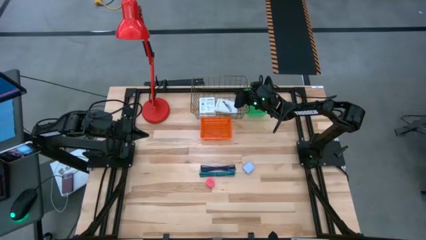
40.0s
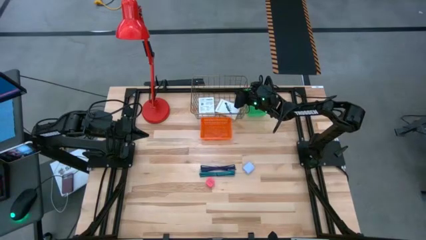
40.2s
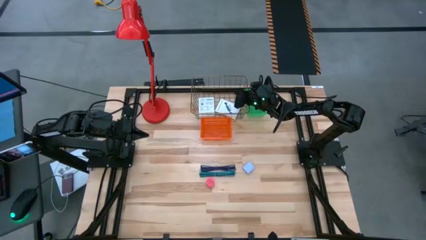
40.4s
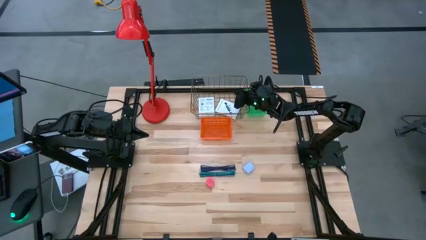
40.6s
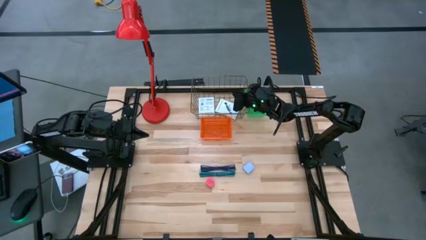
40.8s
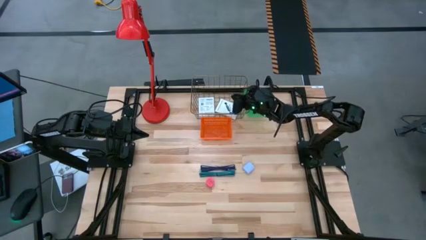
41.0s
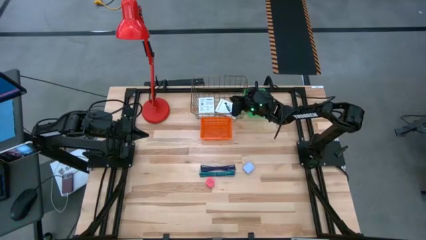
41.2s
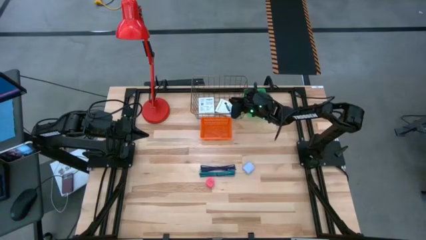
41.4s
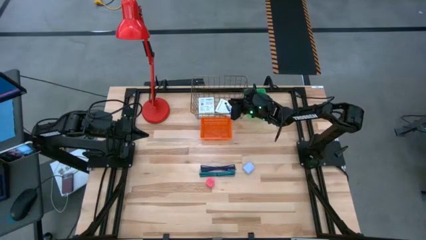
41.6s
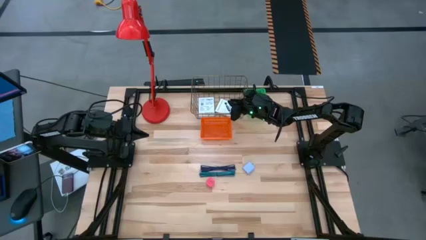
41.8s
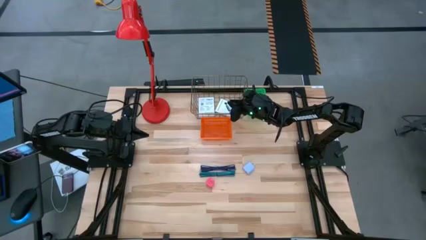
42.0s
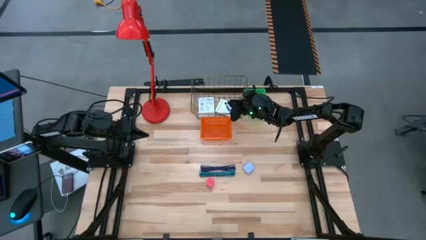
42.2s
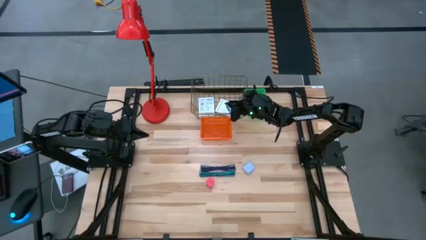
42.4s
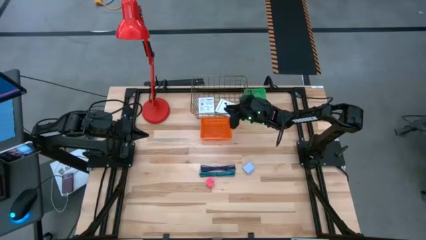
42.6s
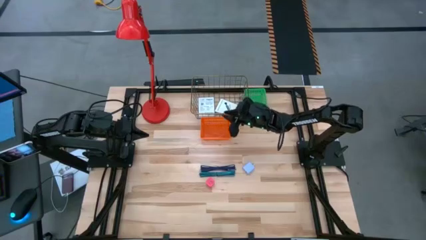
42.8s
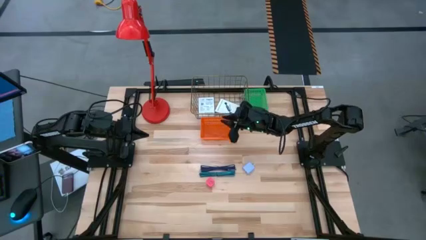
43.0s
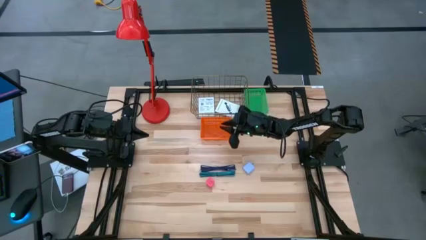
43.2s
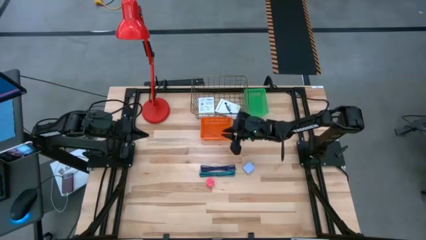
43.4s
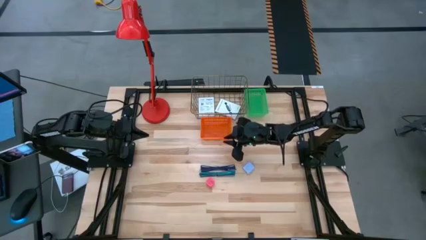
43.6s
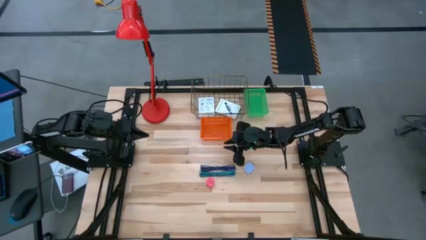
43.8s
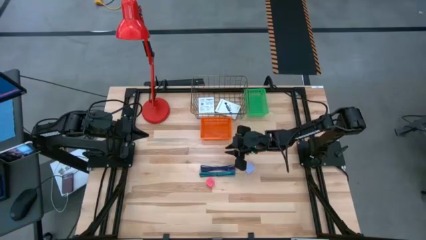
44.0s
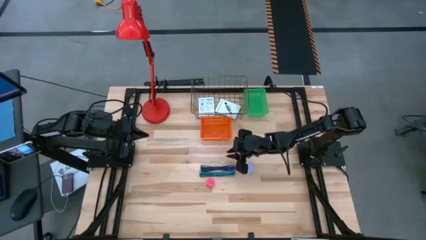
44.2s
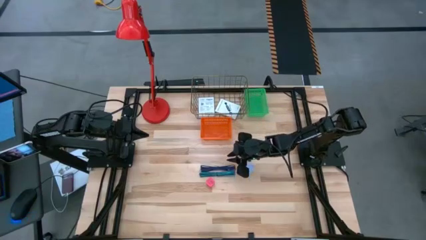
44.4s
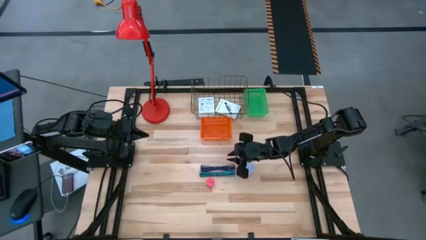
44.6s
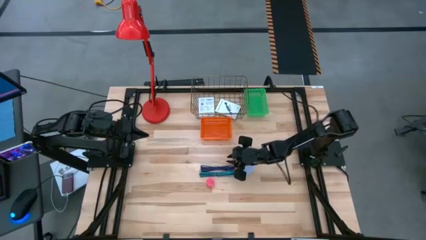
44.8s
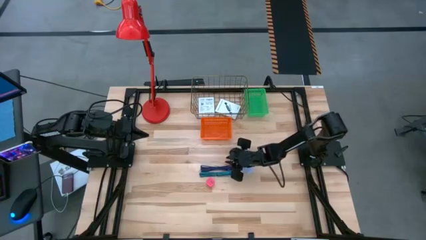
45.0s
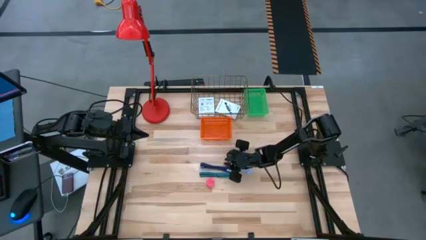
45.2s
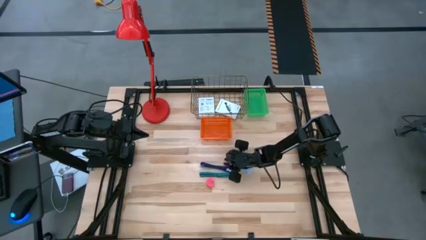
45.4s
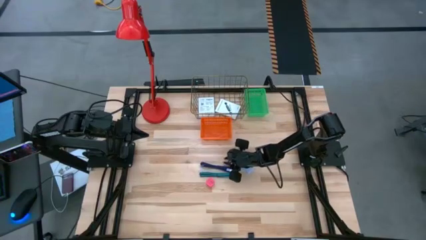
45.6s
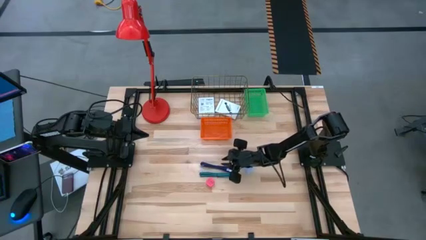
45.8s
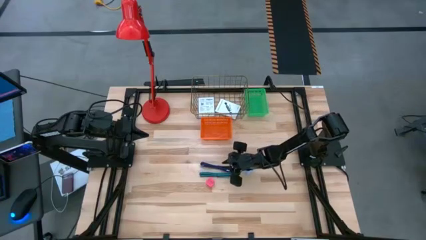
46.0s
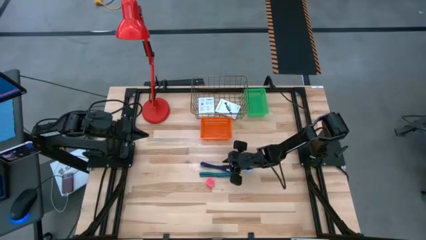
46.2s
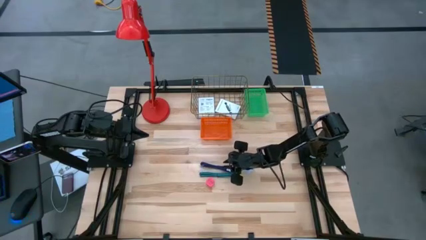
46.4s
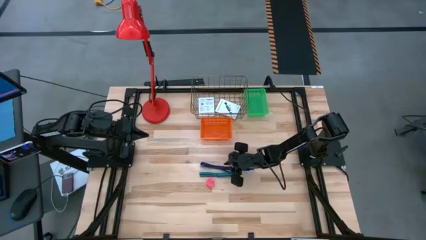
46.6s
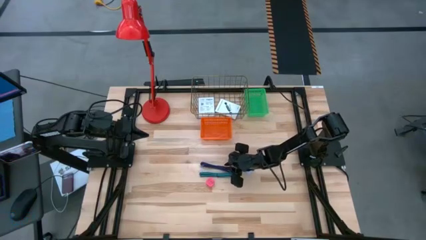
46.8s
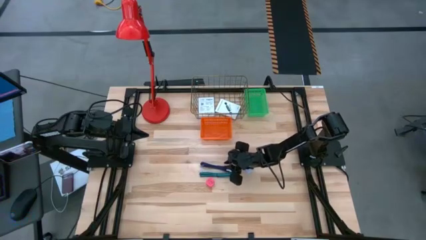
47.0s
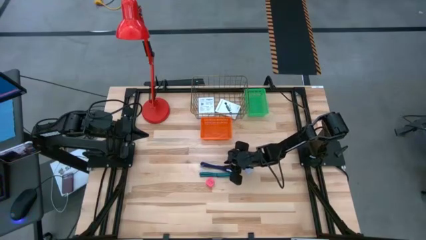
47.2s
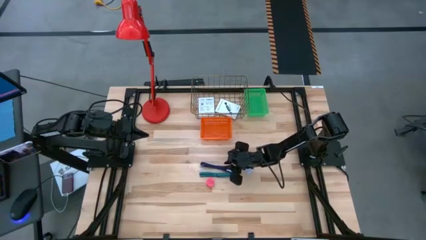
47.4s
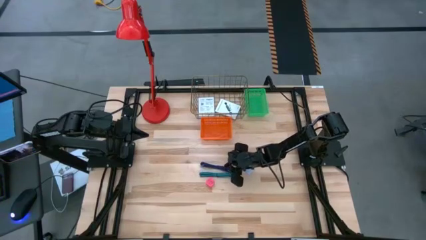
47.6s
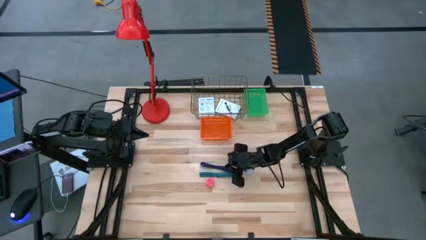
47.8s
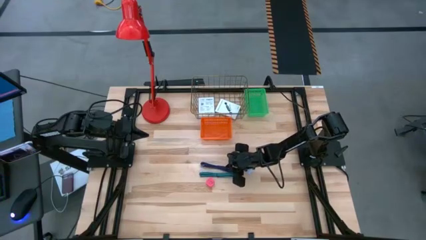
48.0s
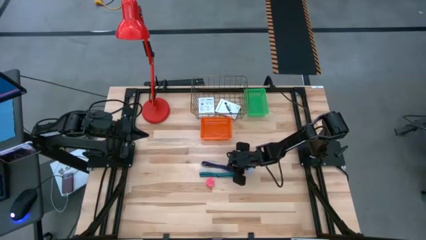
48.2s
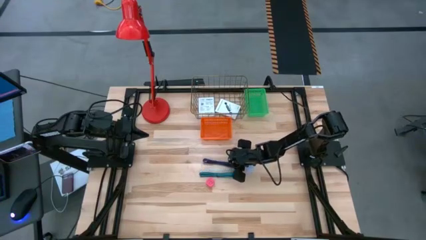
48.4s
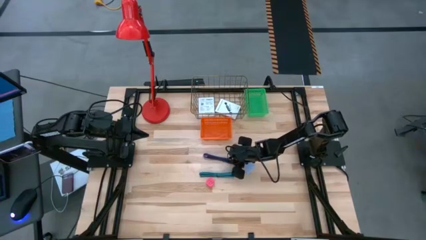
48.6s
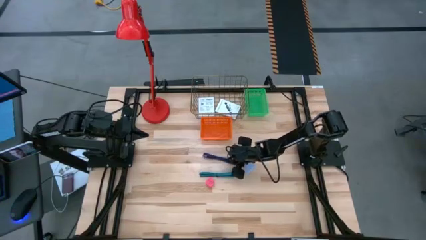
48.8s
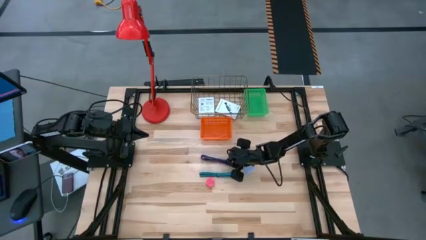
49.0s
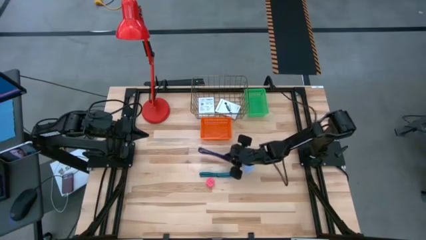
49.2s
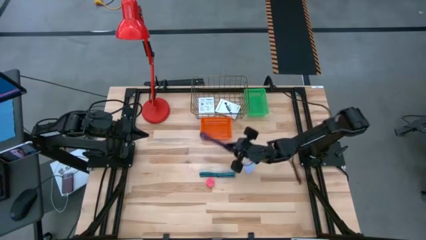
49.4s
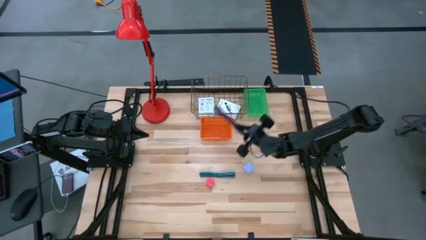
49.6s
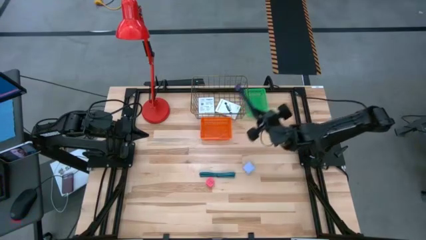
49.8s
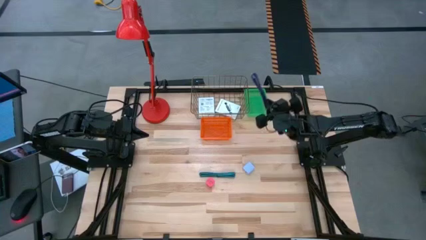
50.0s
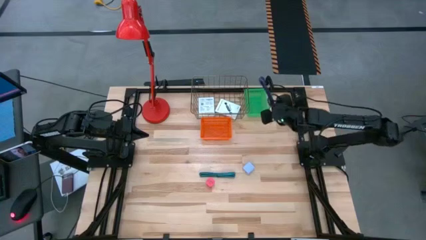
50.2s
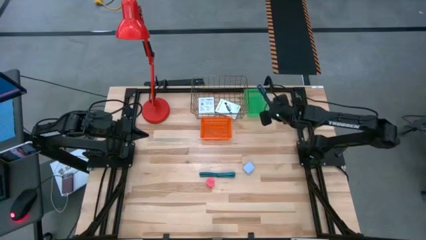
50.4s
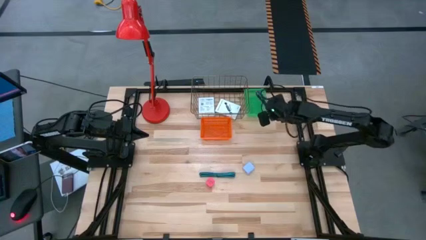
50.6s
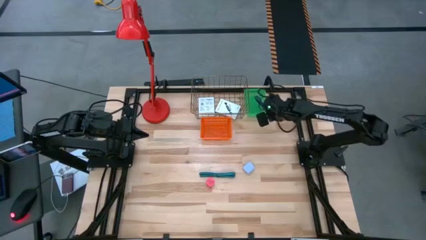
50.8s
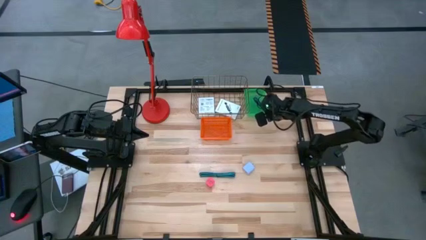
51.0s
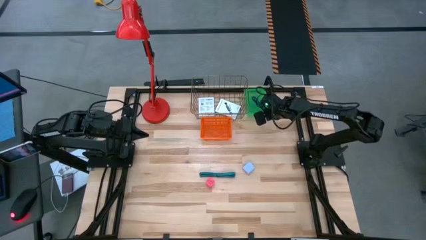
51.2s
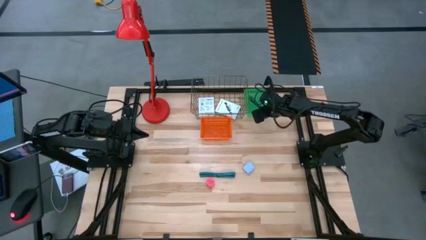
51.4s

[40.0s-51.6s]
Task: Pick and place items into bin
Put the blue charger cable into the green bin

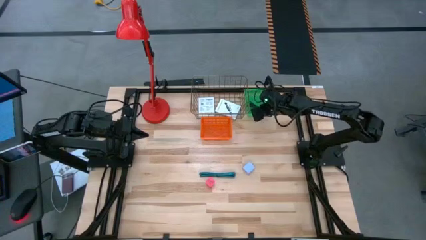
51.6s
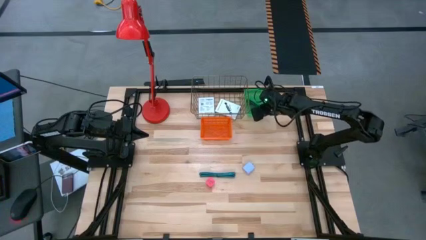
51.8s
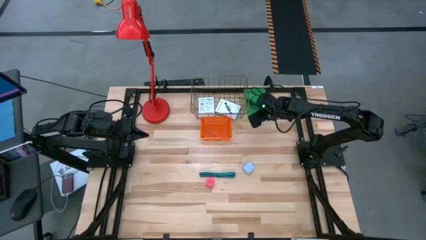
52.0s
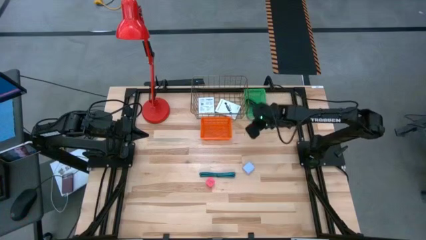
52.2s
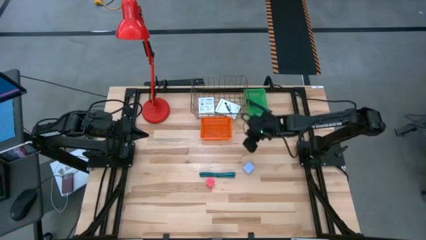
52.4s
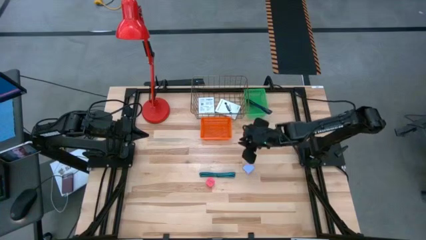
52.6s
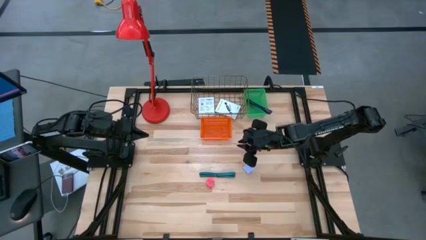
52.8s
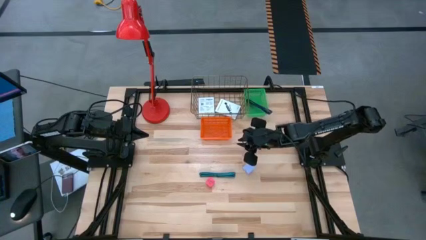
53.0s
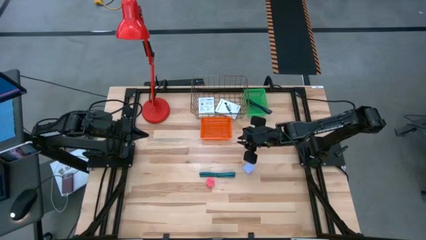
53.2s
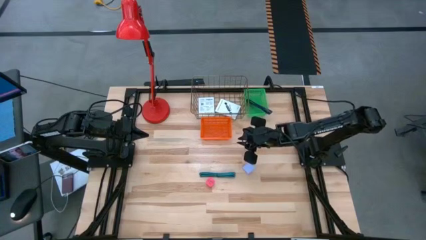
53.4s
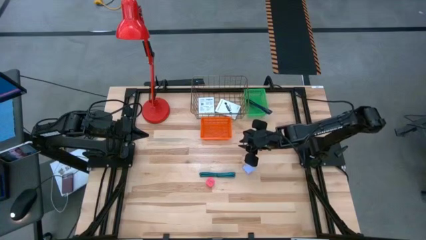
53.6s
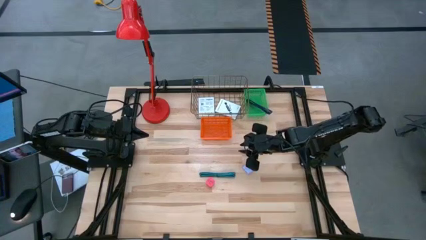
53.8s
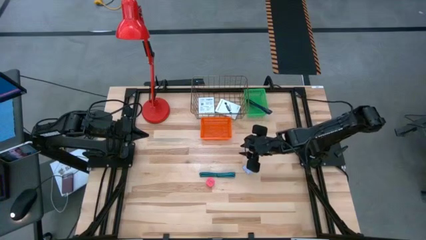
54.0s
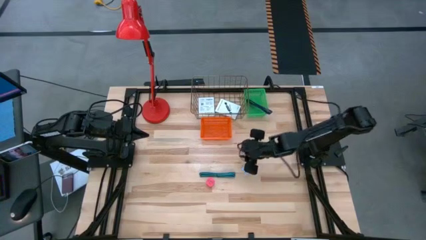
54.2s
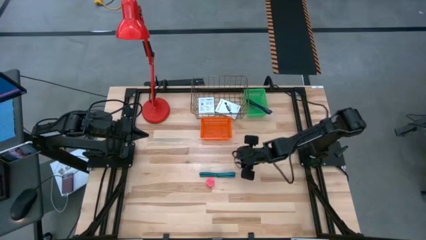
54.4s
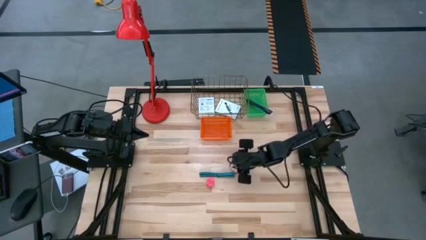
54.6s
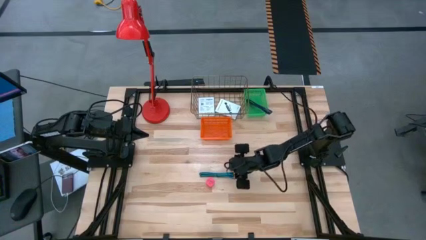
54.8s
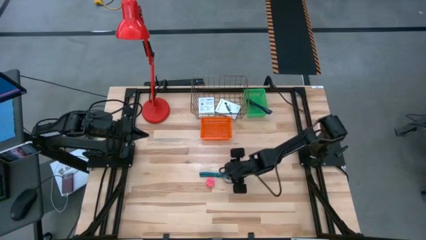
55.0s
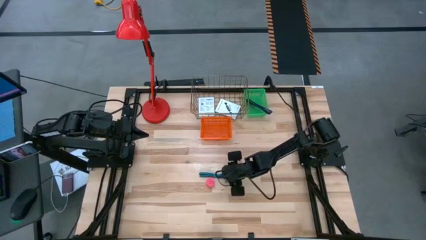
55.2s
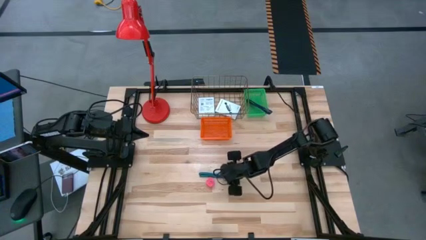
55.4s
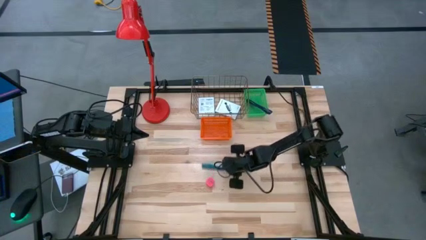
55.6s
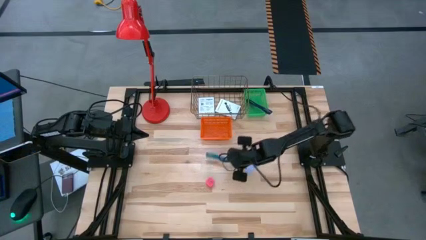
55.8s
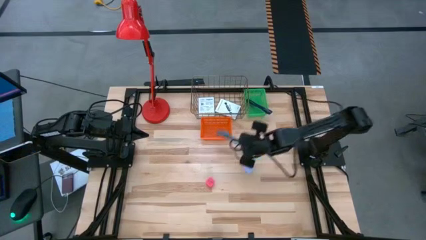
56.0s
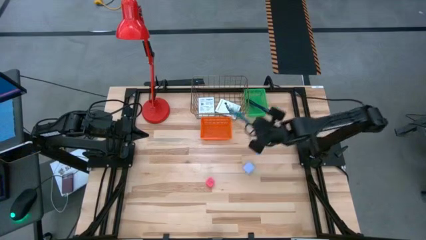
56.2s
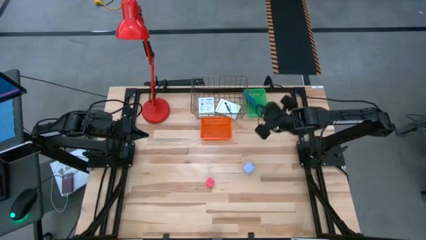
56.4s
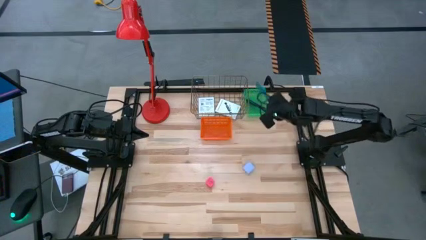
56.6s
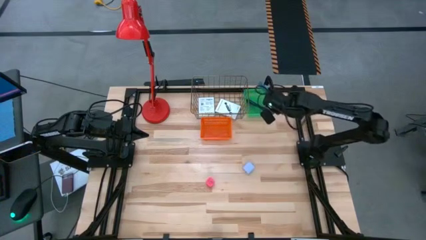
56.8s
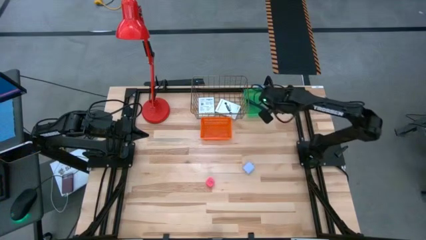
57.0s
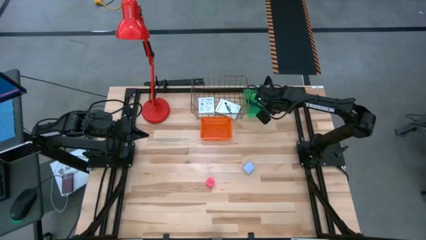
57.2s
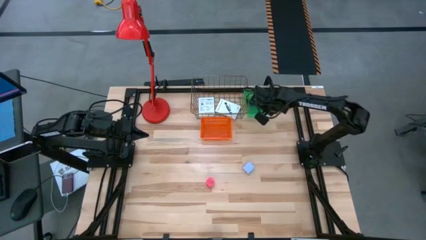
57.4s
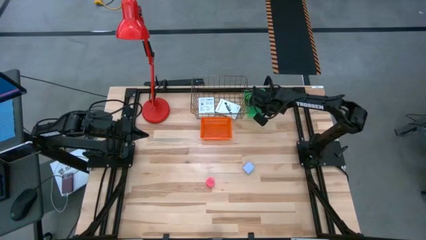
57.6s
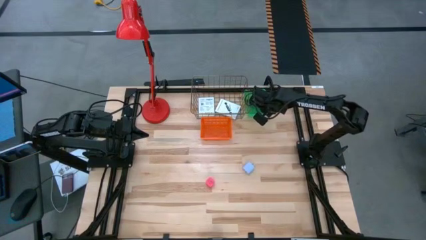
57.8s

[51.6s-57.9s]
Put the light blue charger cable into the green bin
